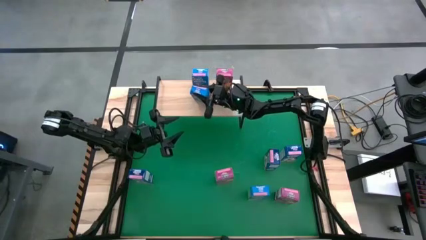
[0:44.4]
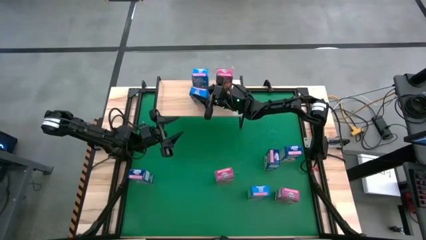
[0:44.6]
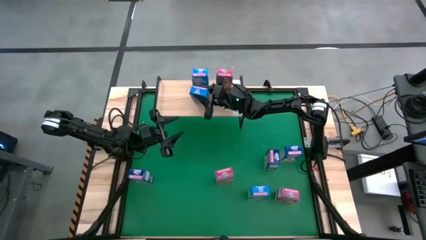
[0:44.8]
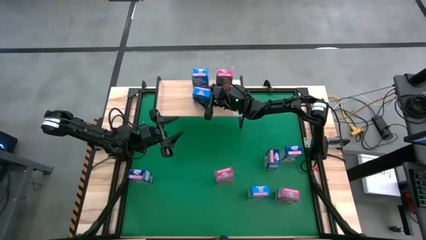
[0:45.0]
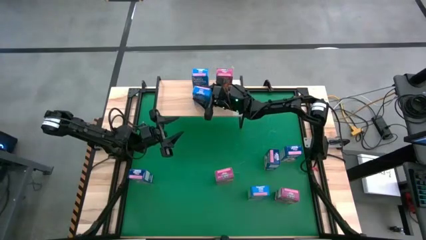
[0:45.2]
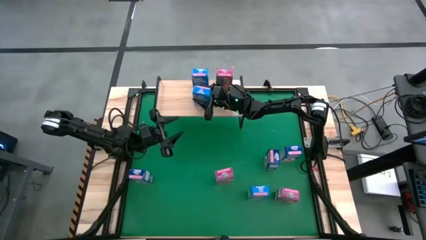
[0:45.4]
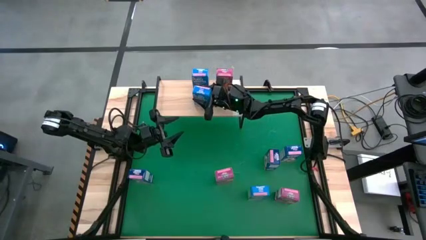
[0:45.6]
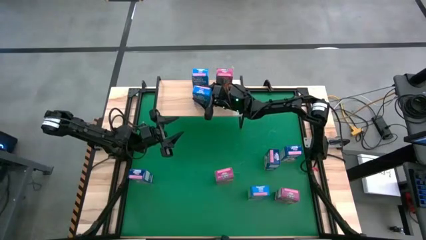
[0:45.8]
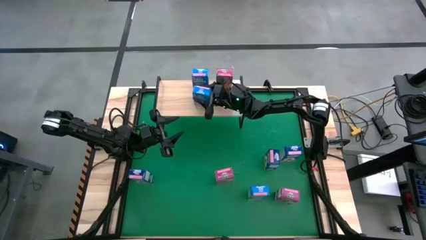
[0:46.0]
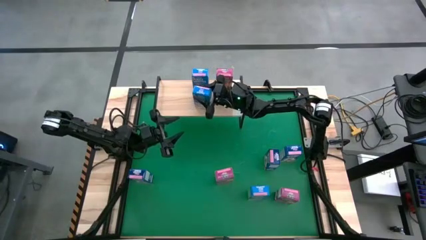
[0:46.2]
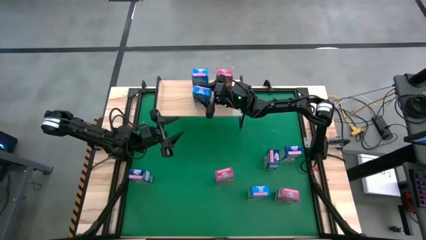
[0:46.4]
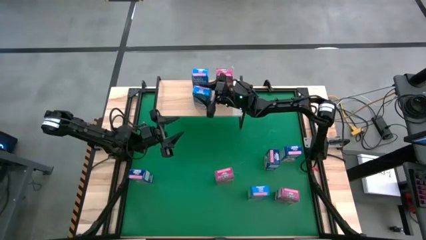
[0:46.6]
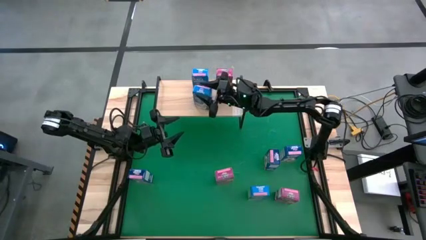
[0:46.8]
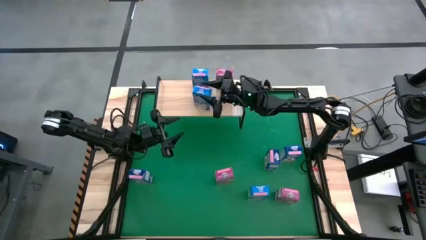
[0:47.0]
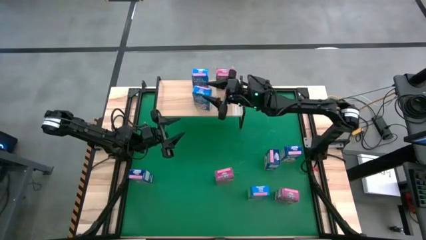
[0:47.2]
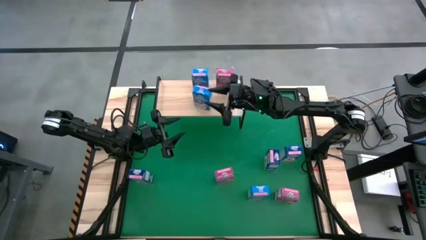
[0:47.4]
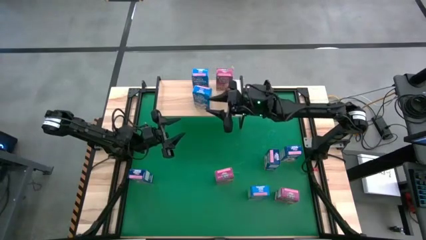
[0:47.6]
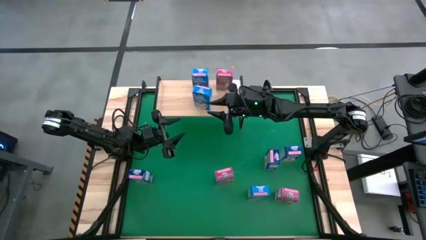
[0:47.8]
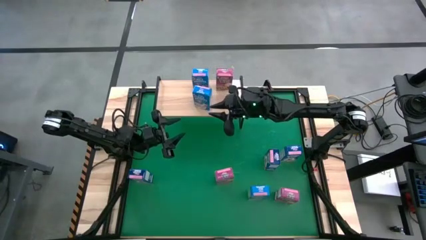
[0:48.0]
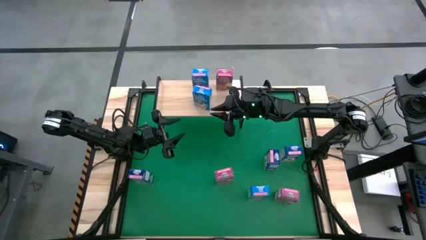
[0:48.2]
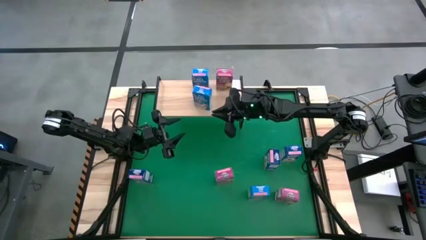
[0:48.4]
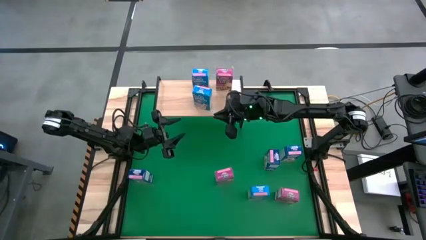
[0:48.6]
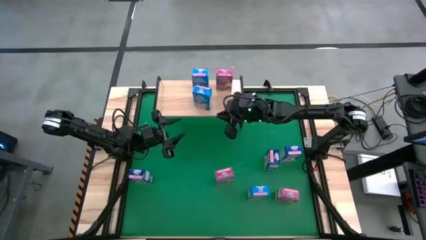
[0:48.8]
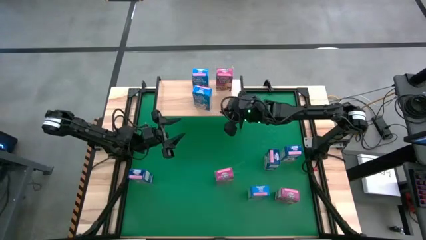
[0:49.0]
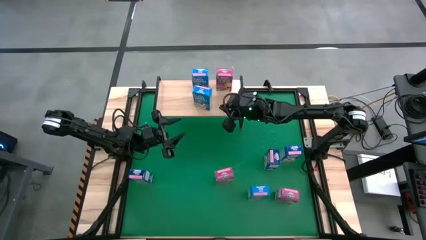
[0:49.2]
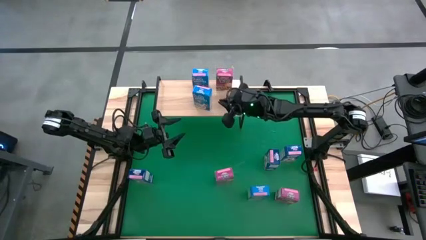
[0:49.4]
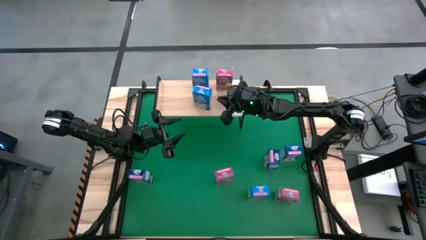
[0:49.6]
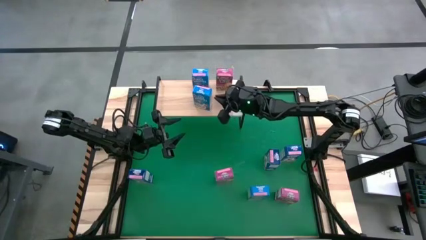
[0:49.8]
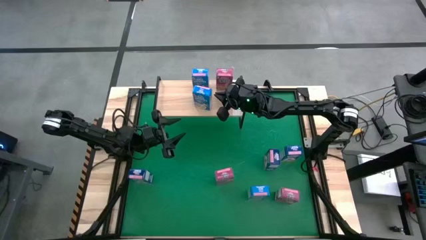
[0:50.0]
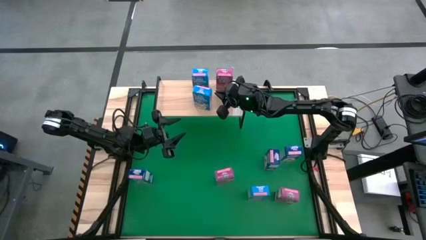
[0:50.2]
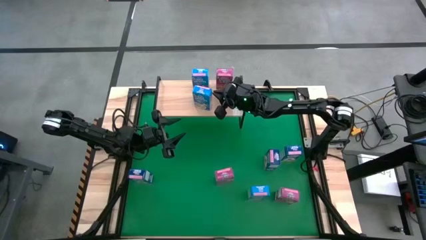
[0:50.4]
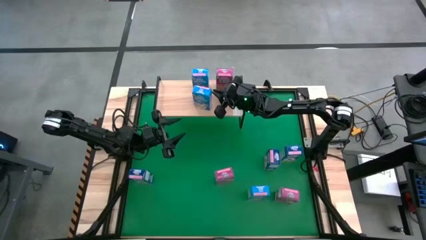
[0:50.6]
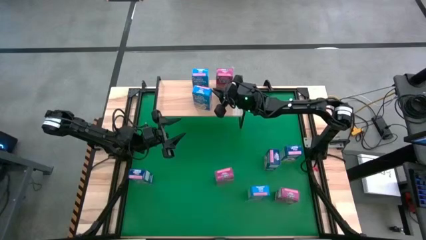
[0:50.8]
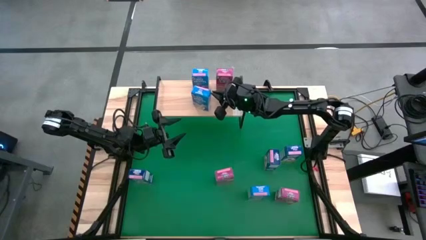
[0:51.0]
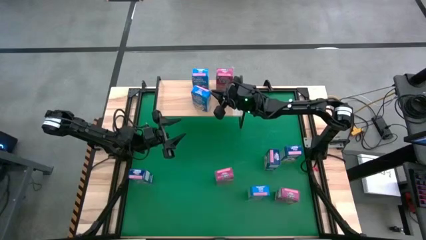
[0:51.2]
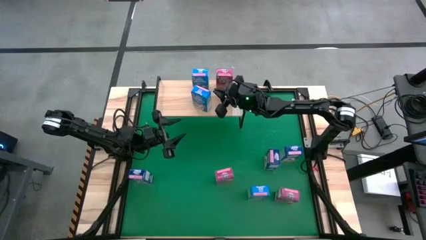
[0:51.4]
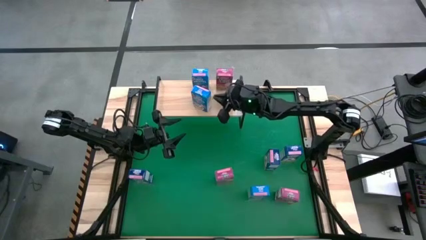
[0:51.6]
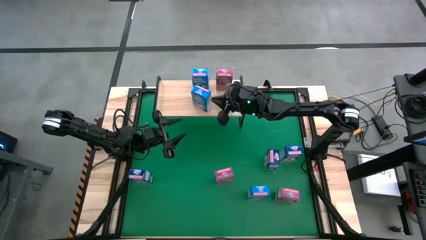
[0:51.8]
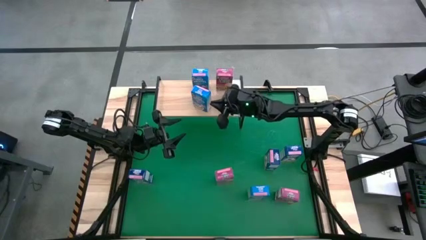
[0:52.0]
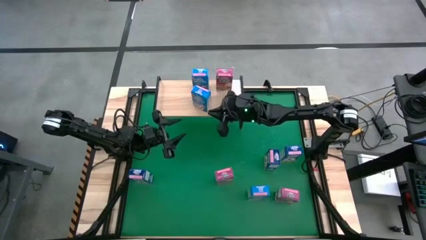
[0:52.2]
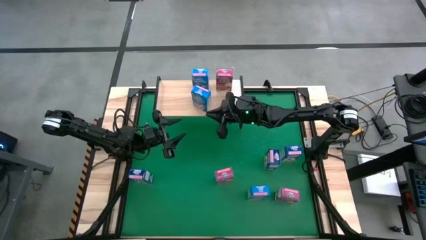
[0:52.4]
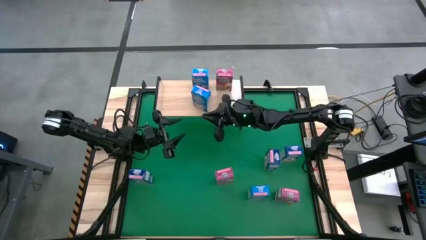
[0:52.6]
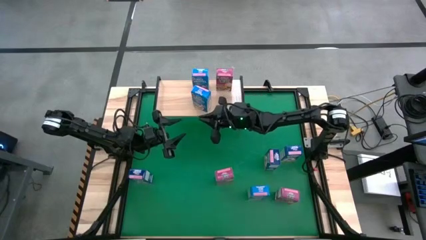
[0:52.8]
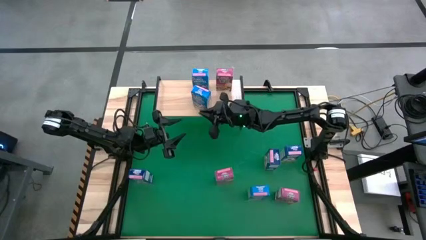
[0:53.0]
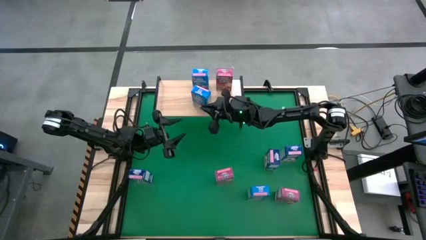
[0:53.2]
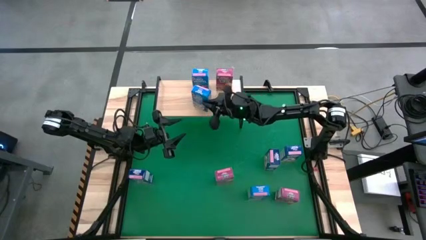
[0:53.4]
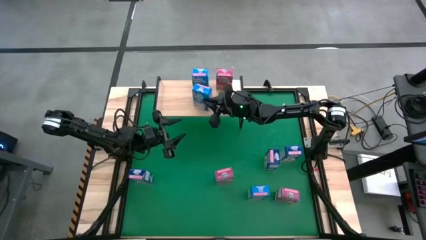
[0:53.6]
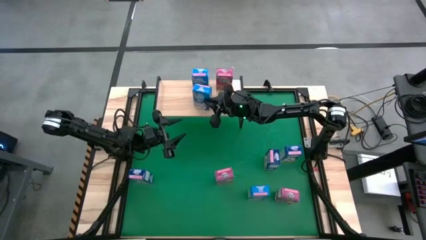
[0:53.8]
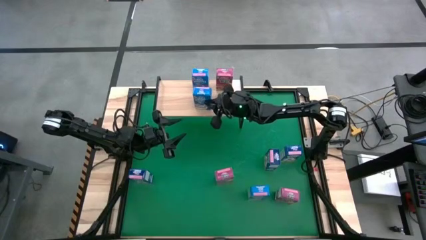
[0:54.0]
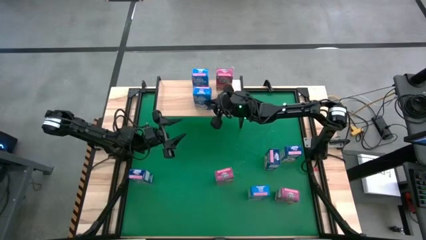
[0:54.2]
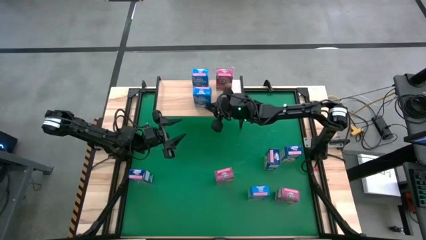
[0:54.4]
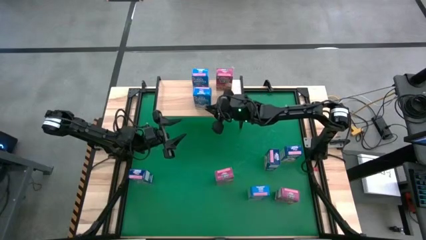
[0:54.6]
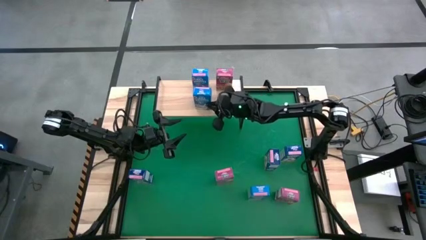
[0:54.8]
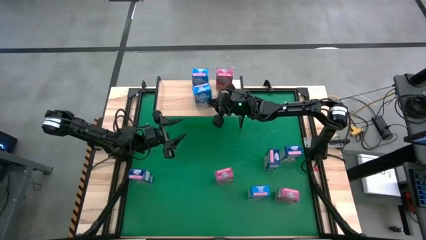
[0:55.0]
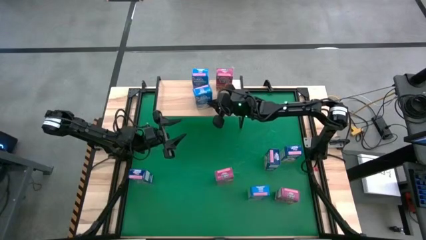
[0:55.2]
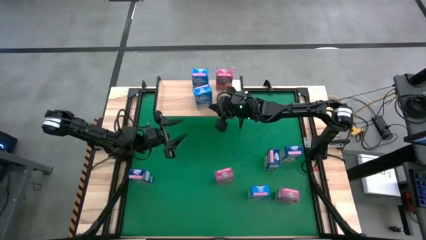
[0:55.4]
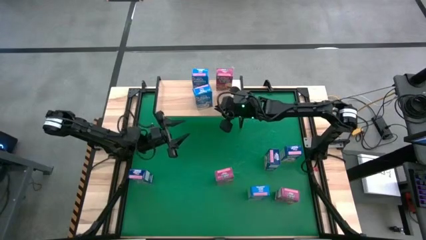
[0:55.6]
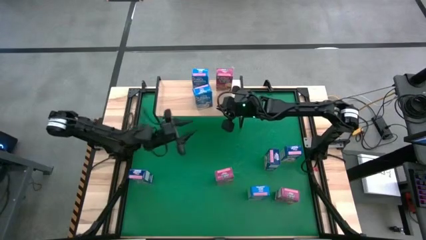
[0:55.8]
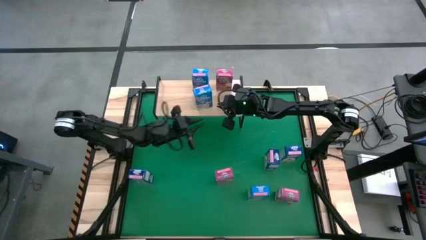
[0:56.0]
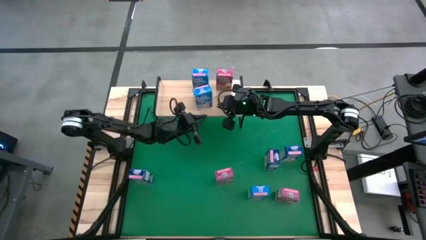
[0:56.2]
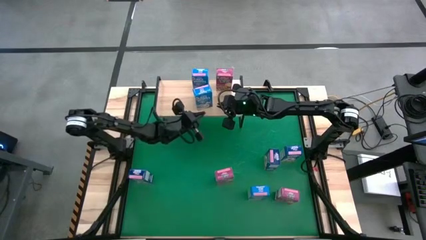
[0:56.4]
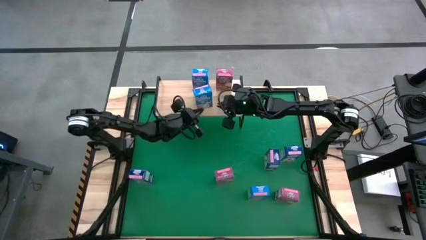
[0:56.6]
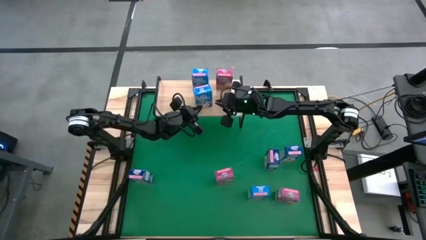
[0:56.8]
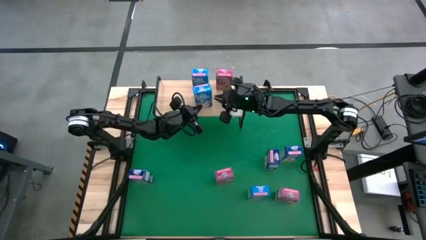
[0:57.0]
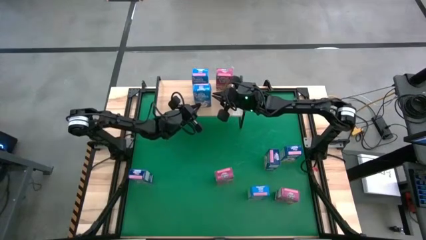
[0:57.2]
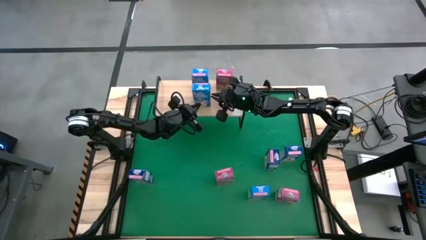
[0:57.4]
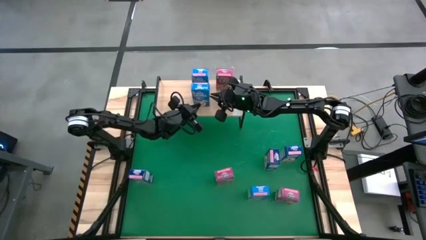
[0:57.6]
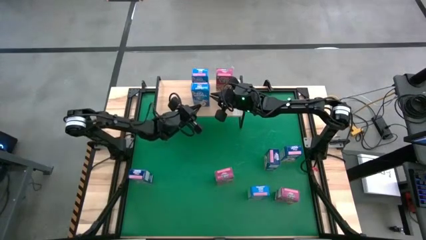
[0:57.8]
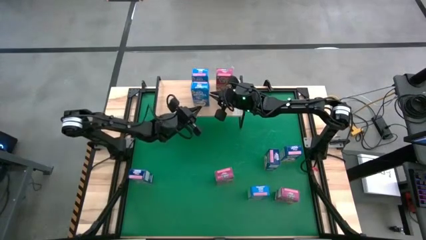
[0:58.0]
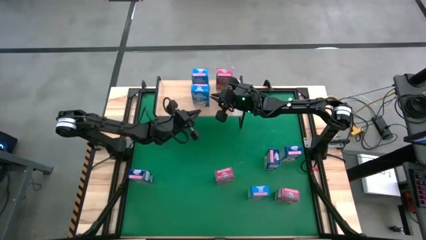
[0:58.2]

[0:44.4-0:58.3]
Task: Stack cereal on shelf
Put the top light blue cereal box on the shelf aligned with the other light blue box
